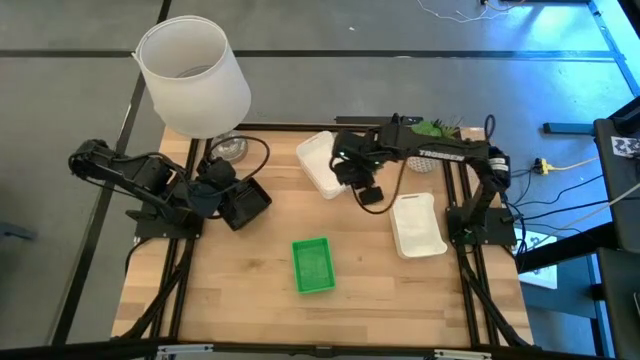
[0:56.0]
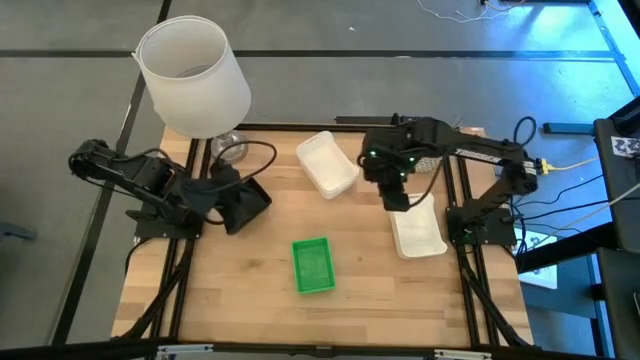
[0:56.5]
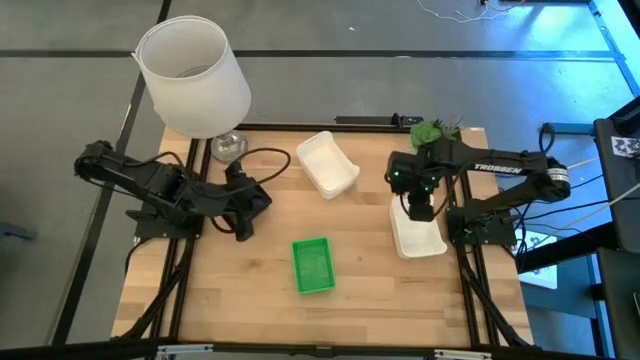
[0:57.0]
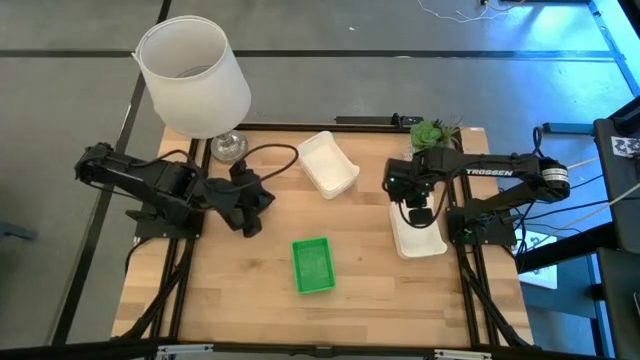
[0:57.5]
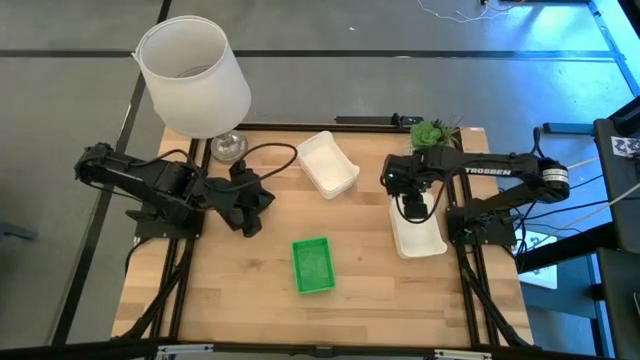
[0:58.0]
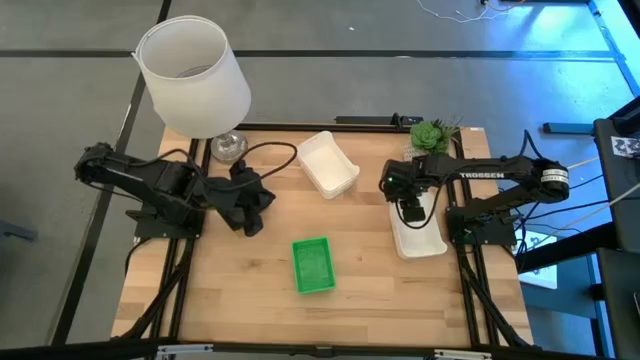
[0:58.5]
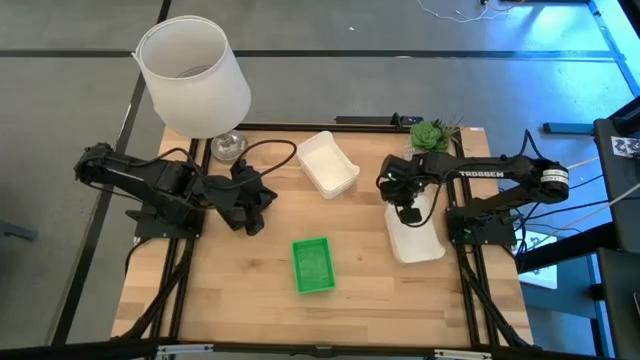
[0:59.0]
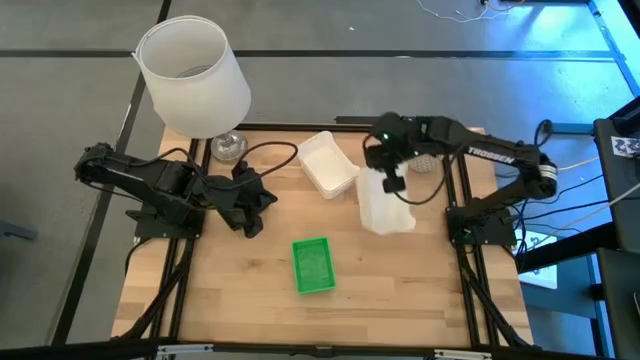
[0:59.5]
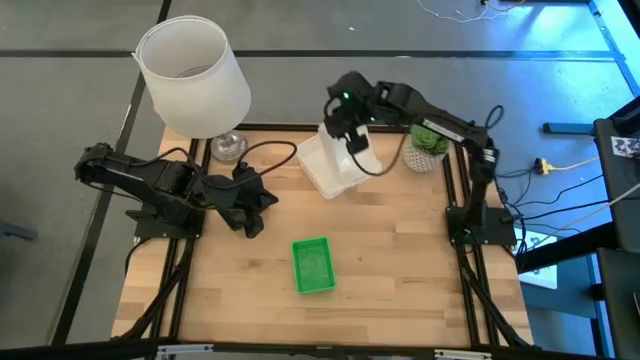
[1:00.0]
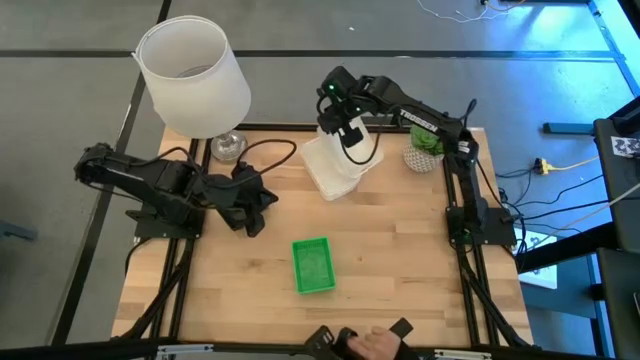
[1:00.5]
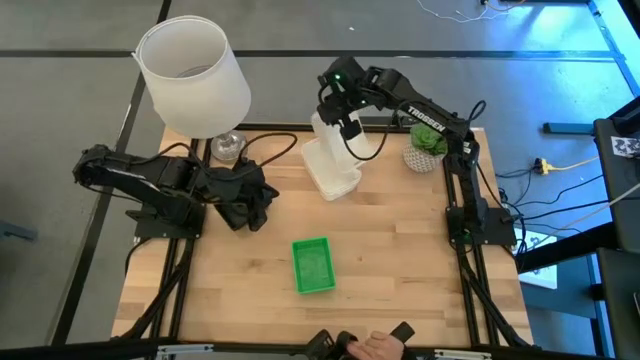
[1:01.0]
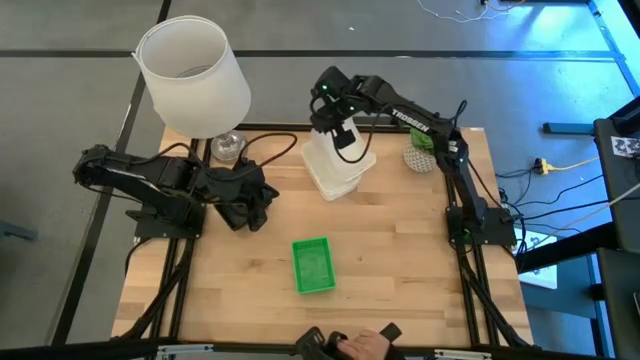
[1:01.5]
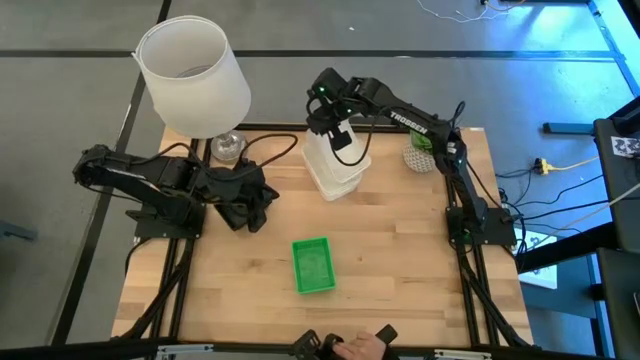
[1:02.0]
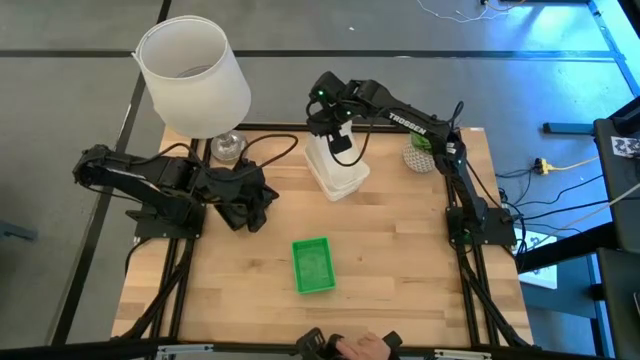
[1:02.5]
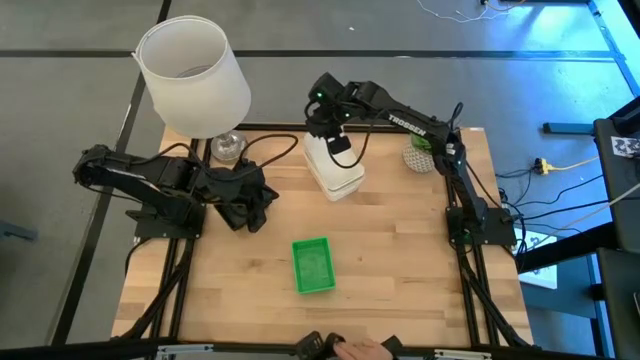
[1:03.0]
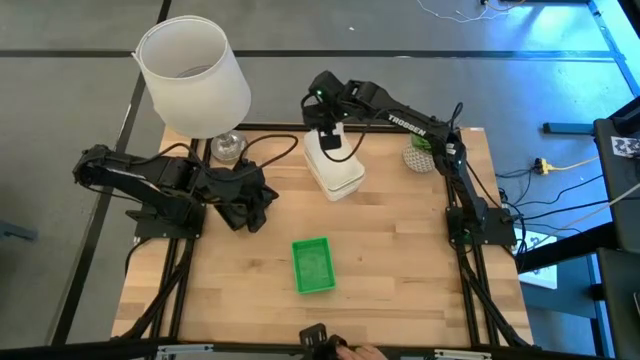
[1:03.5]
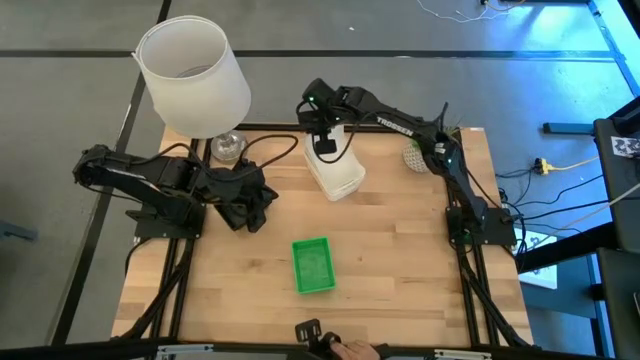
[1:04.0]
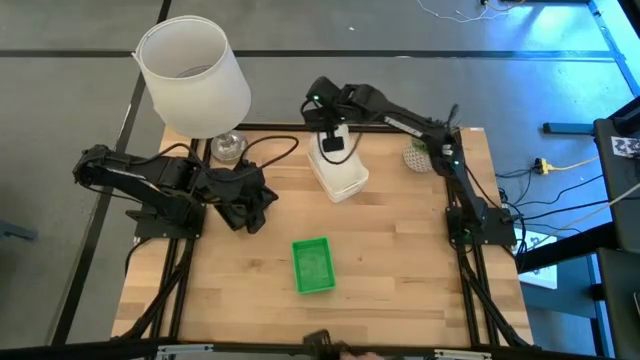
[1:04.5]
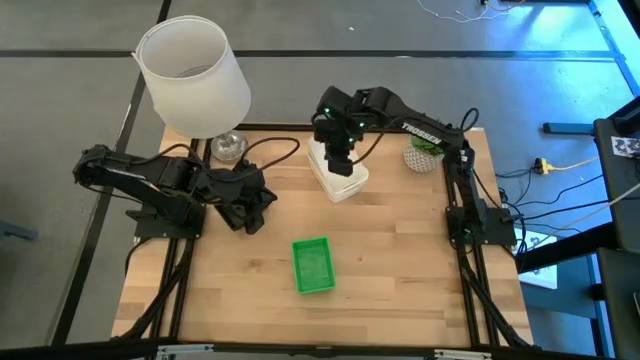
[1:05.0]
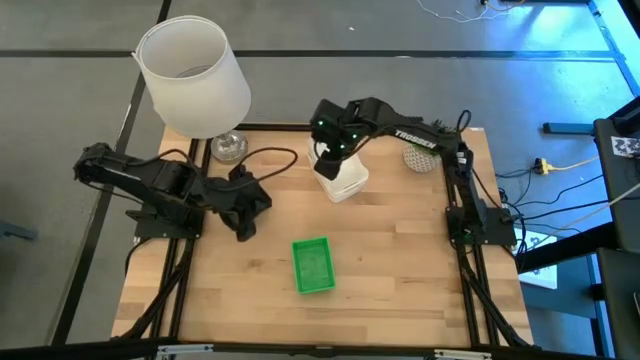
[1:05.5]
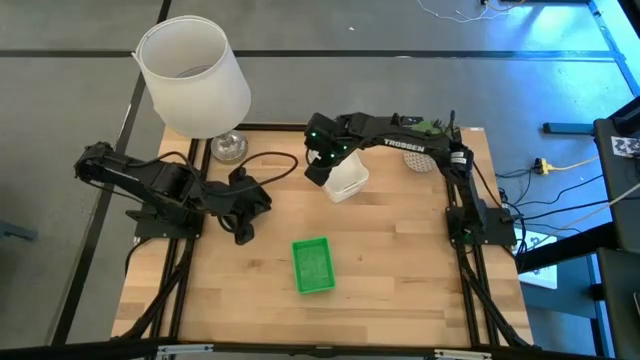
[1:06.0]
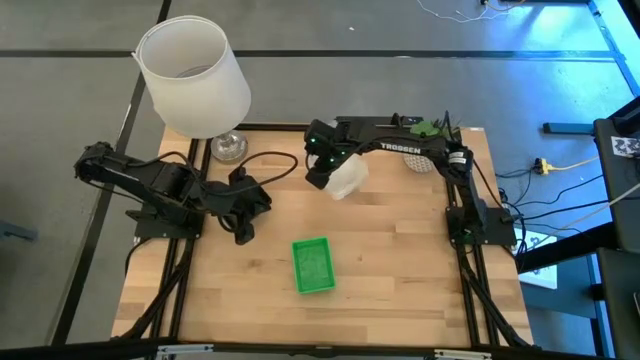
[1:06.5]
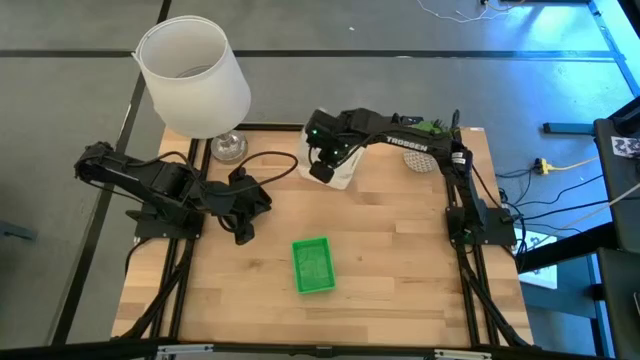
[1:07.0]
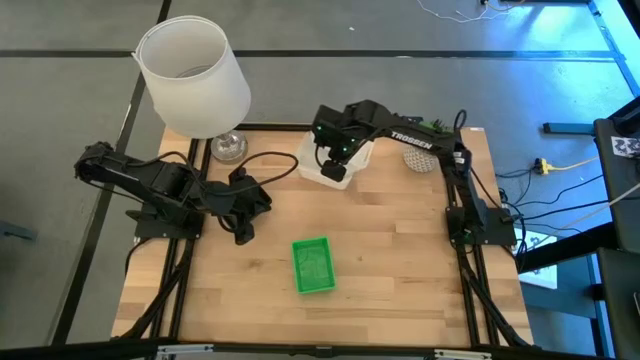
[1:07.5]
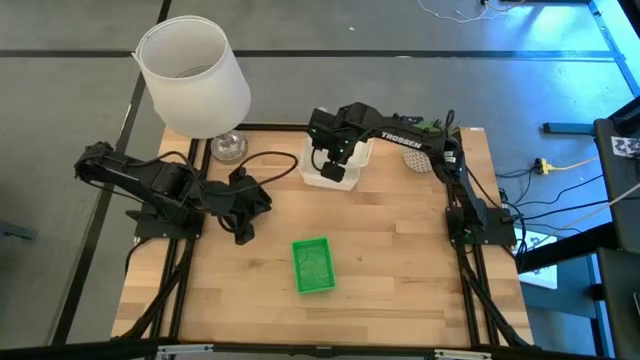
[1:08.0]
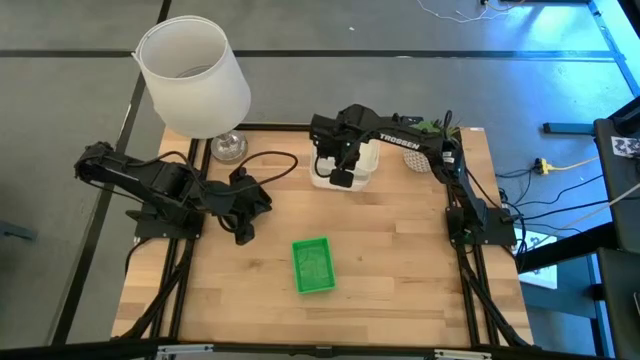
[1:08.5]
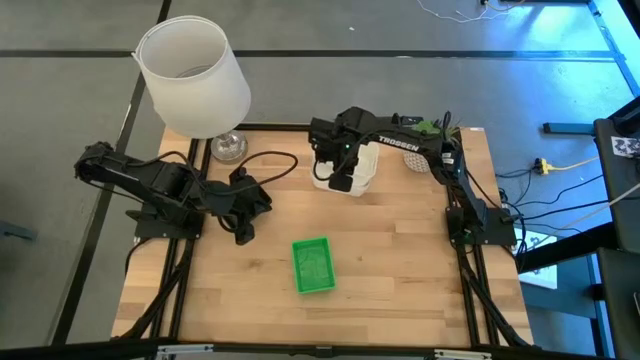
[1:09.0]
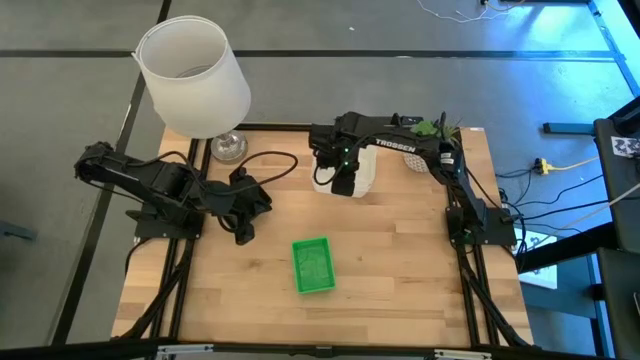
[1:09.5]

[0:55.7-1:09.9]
Stack the right white bin on the other white bins

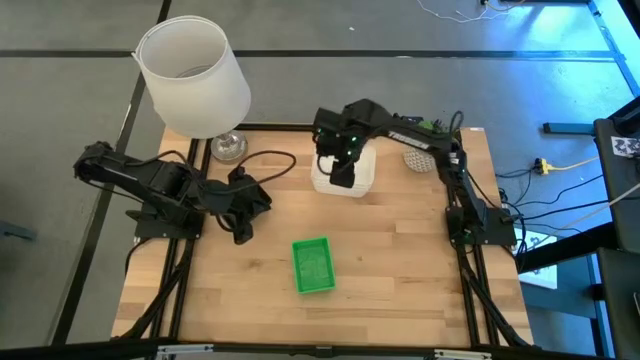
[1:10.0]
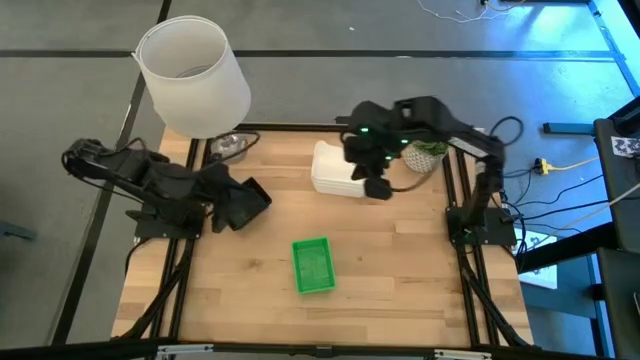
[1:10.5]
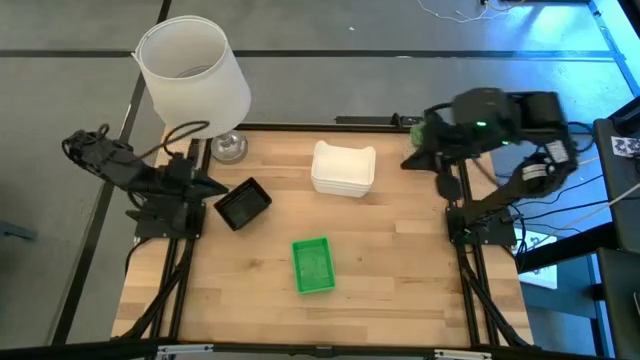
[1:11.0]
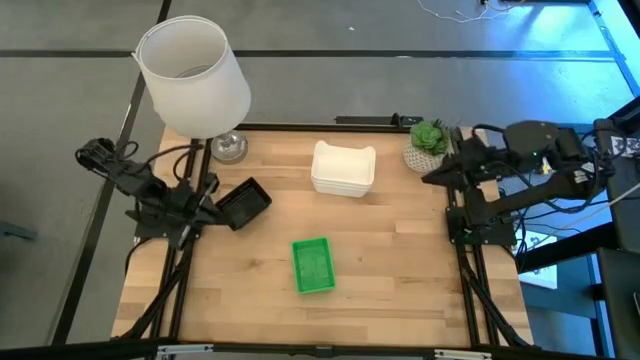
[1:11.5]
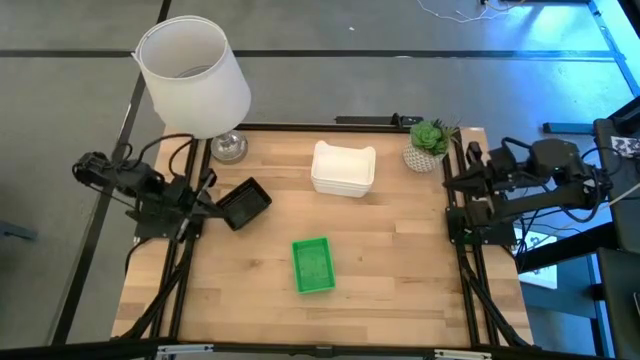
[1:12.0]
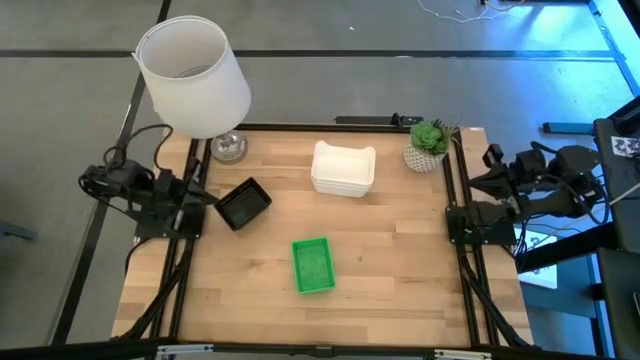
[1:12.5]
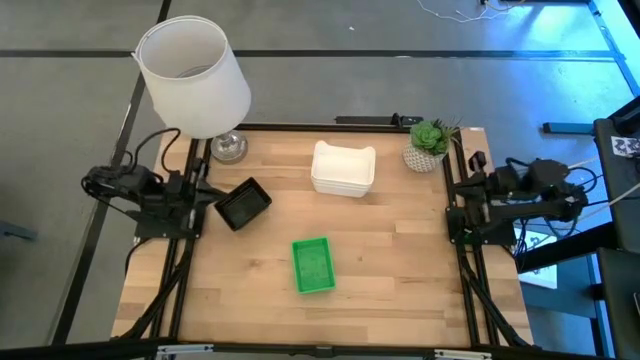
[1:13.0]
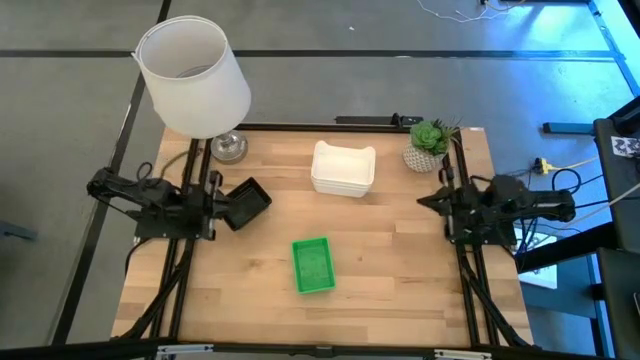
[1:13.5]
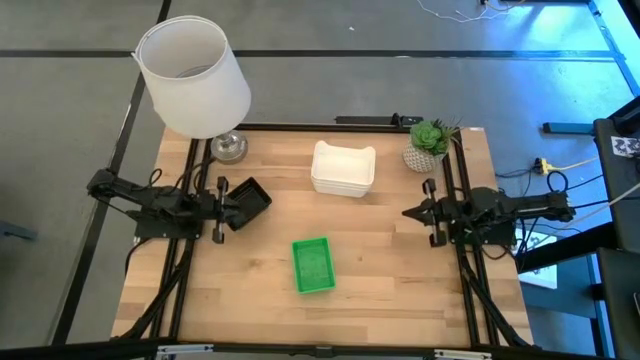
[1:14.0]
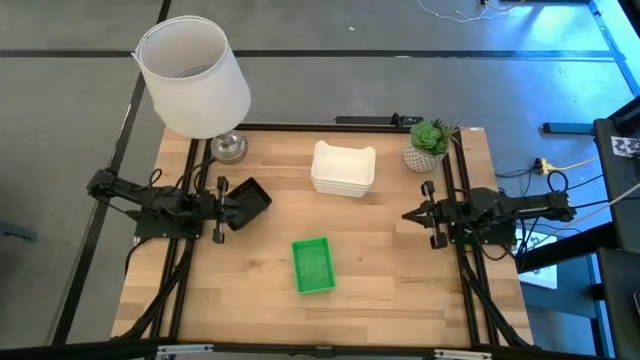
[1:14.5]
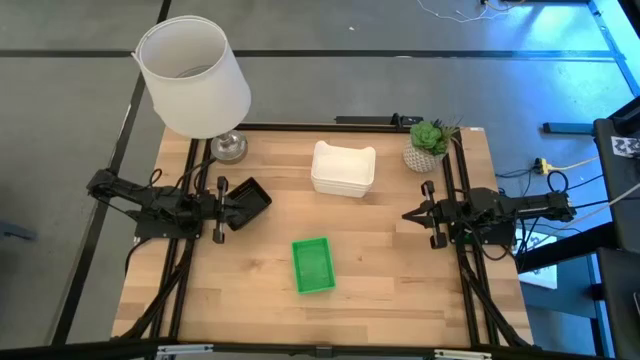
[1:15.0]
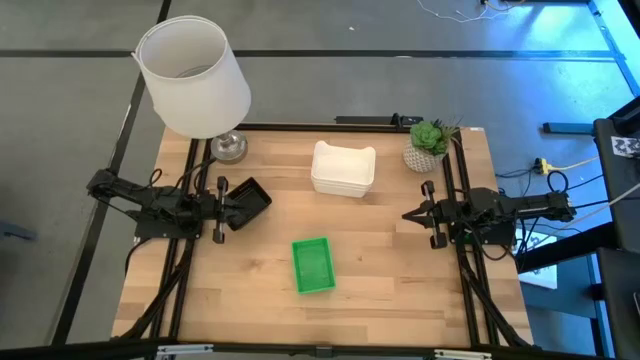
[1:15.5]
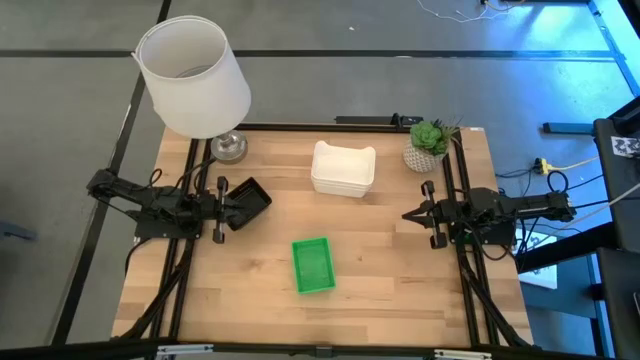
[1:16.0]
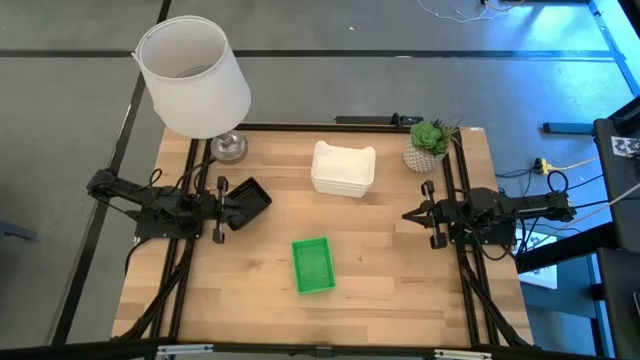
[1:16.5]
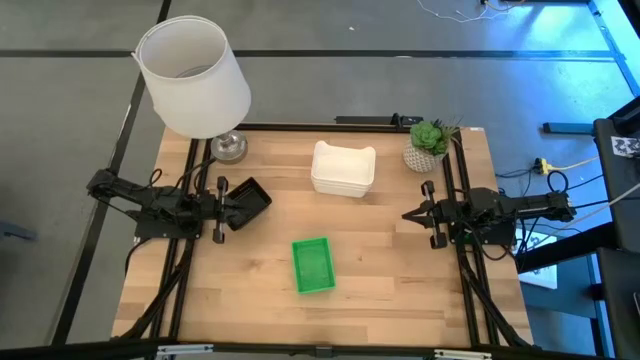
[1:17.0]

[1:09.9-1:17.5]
Return to Home Position
